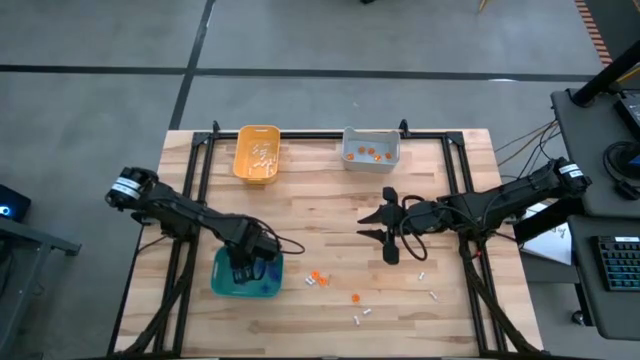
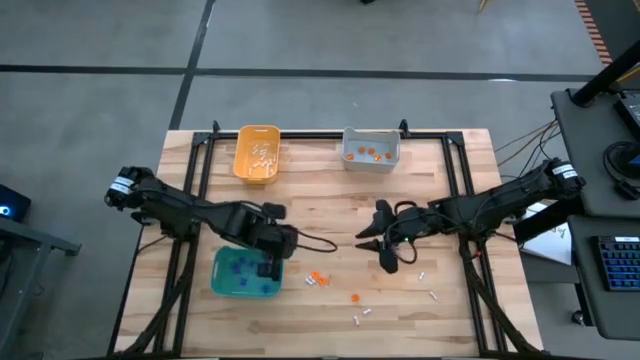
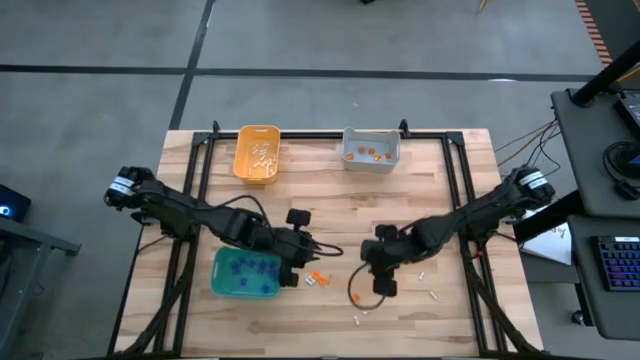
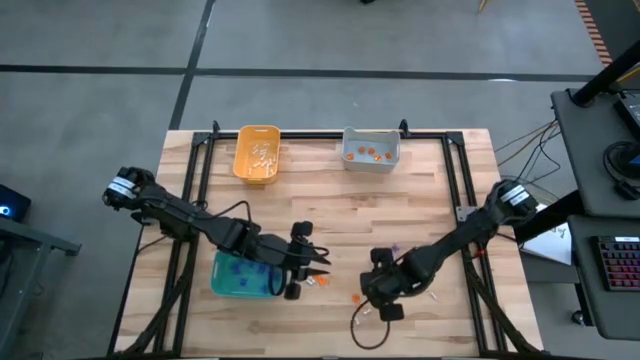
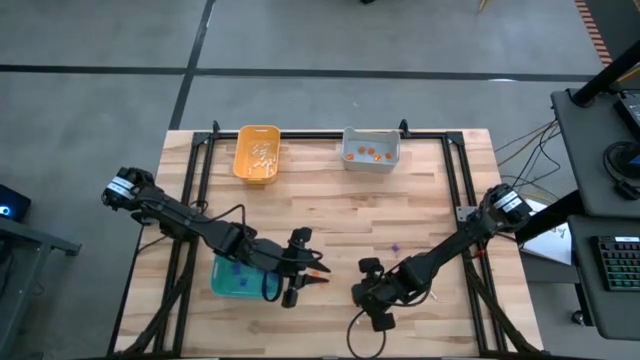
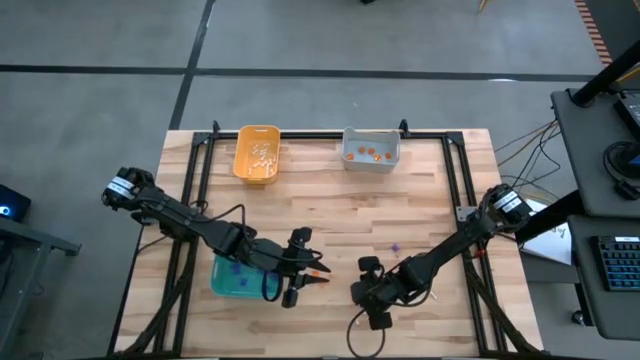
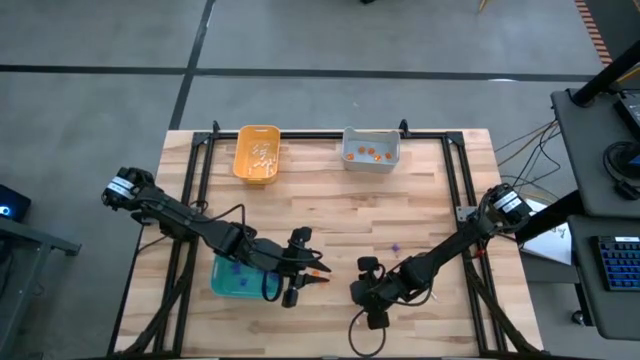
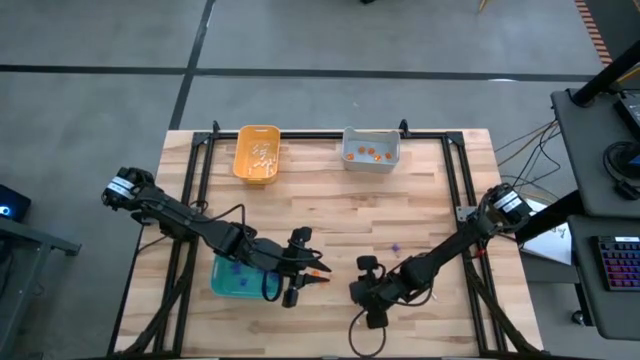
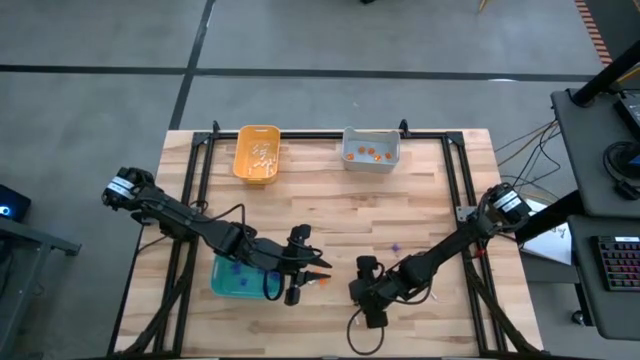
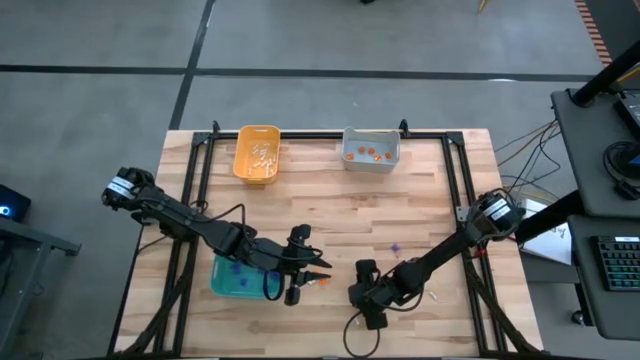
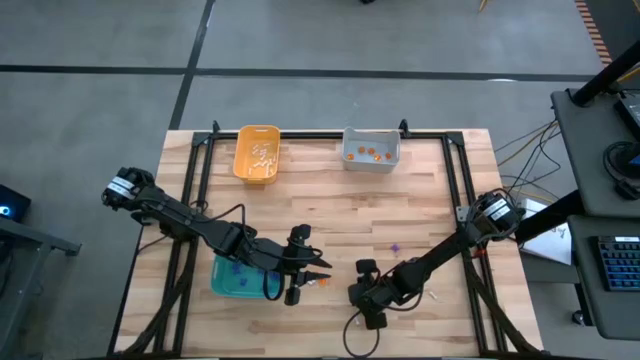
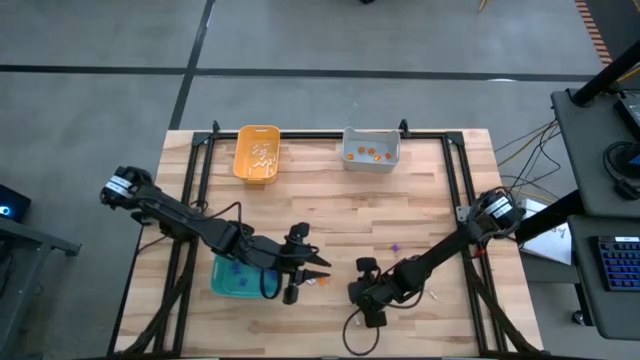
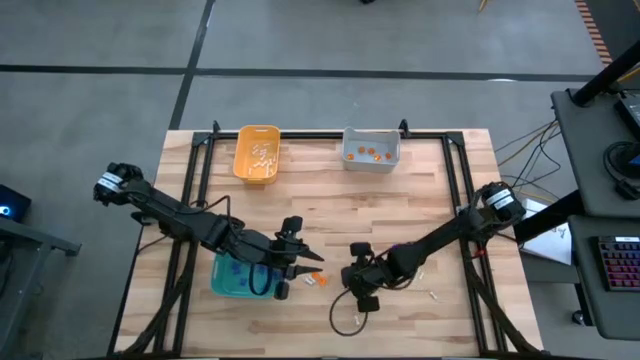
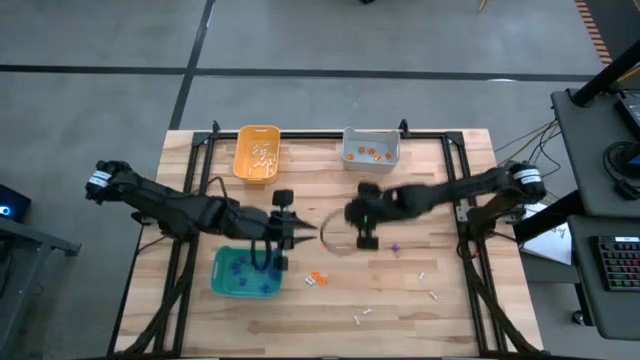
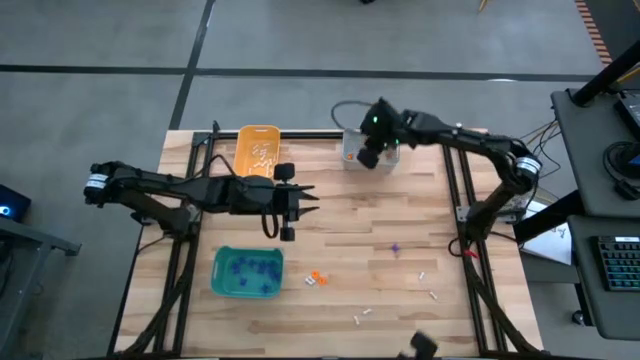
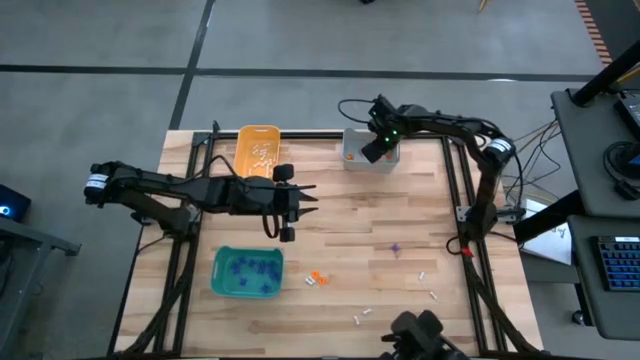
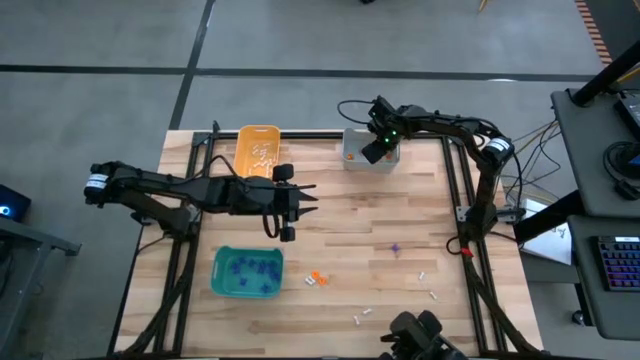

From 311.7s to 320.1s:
Task: Sort Halloween decoration
Put the orange pumpkin toy into the gray bin

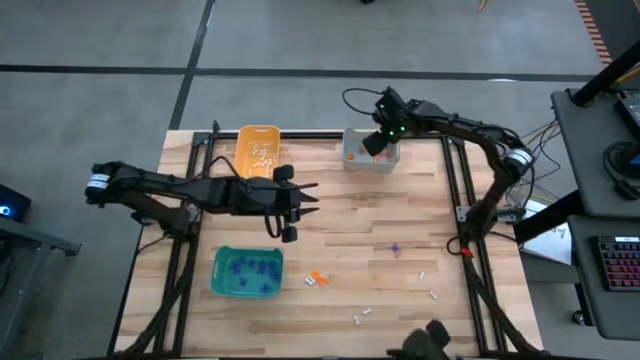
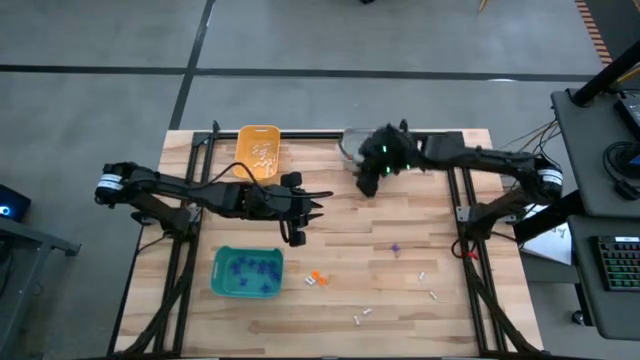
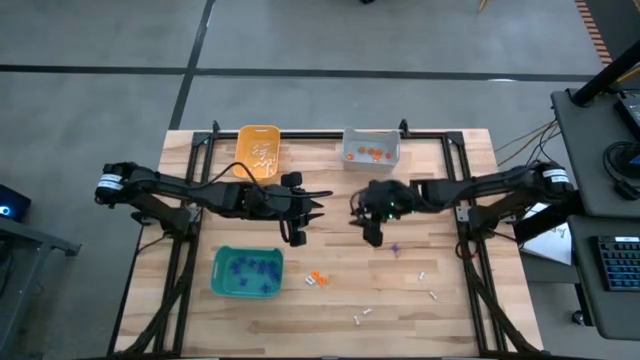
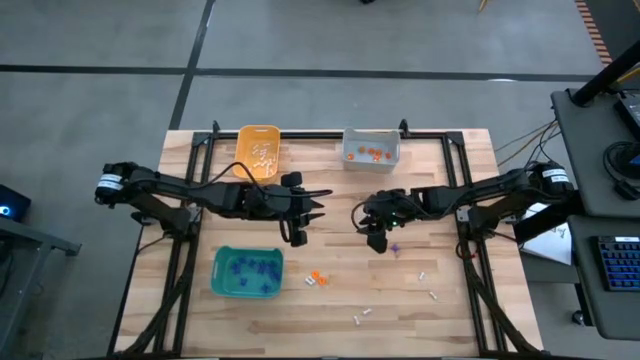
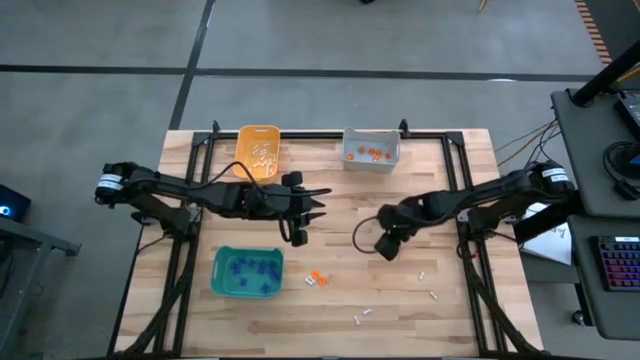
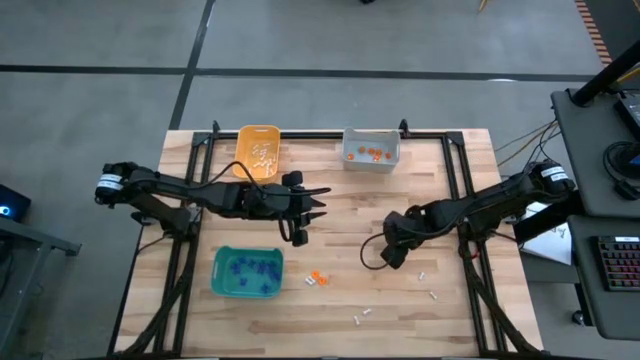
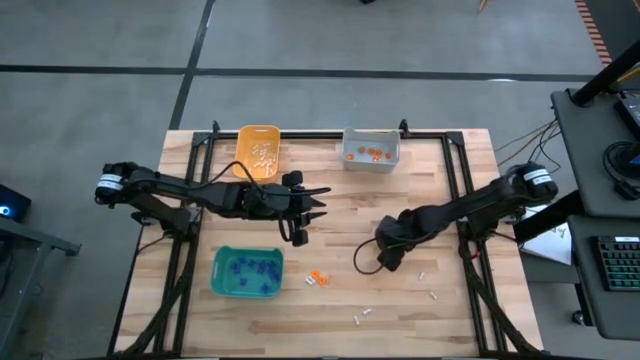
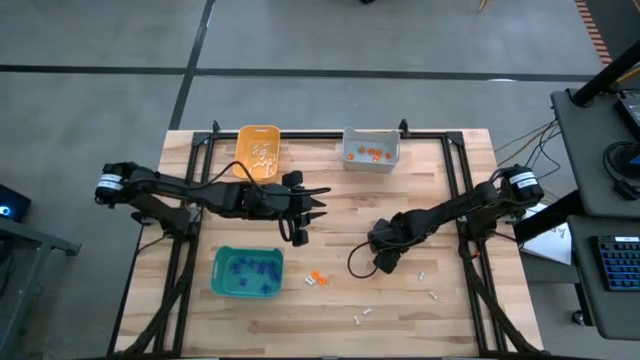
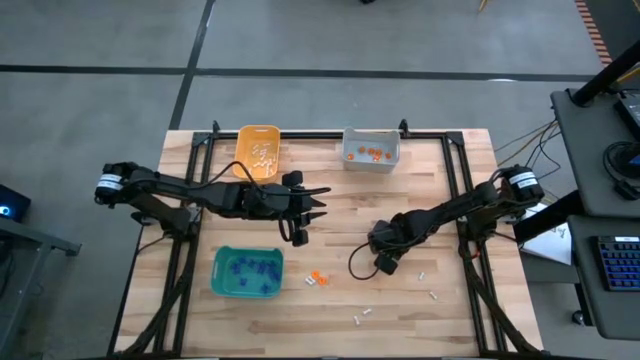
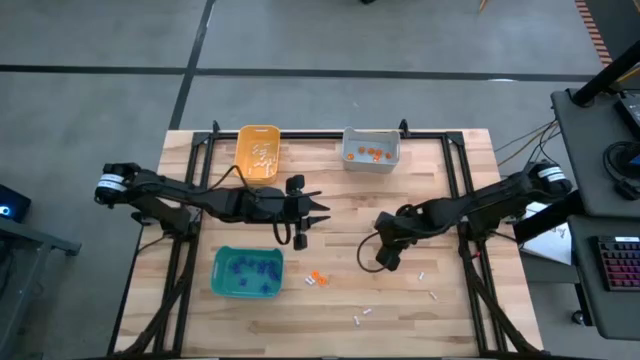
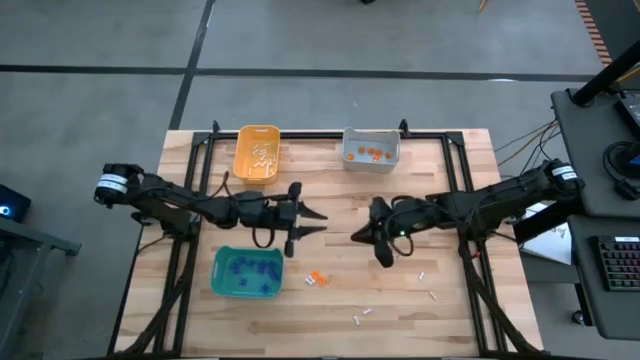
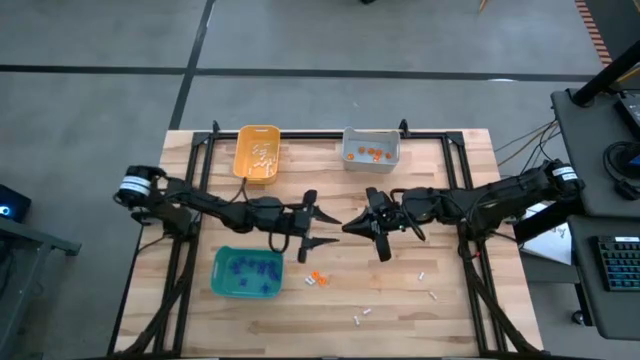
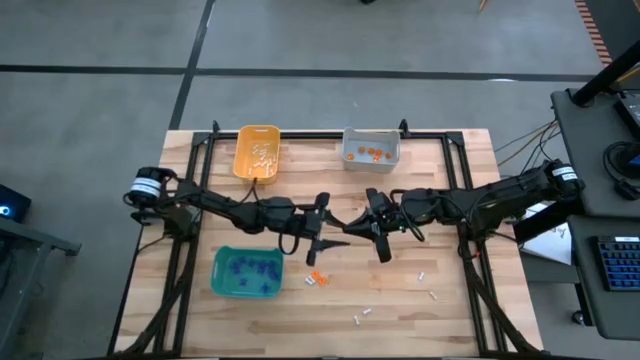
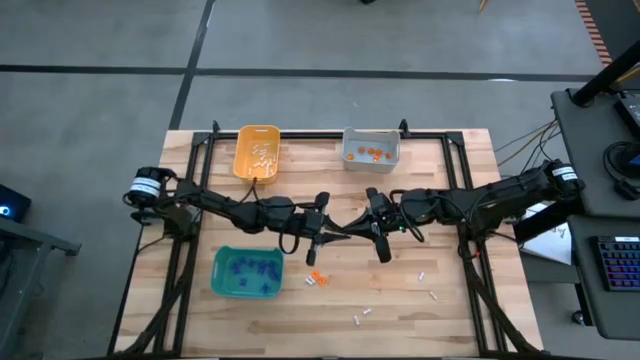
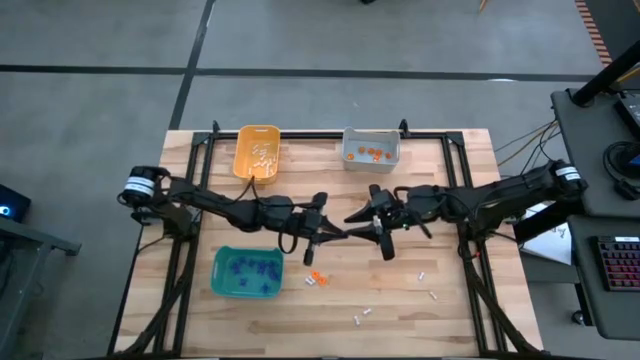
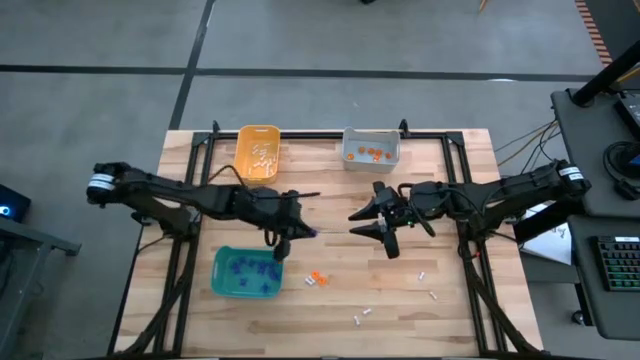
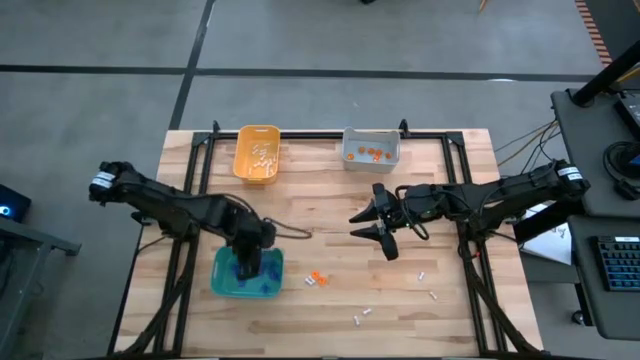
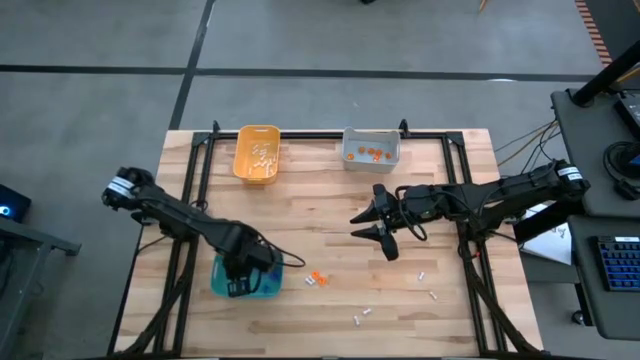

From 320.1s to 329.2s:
Put the blue spider toy into the green bin

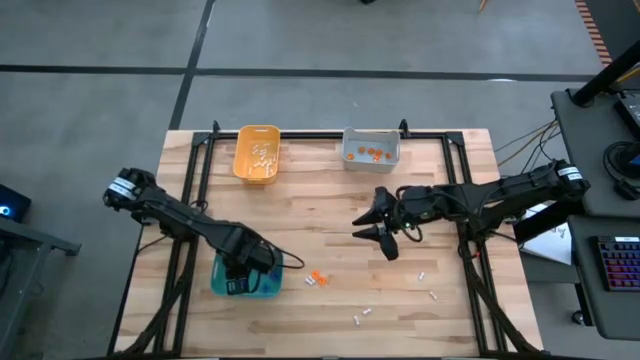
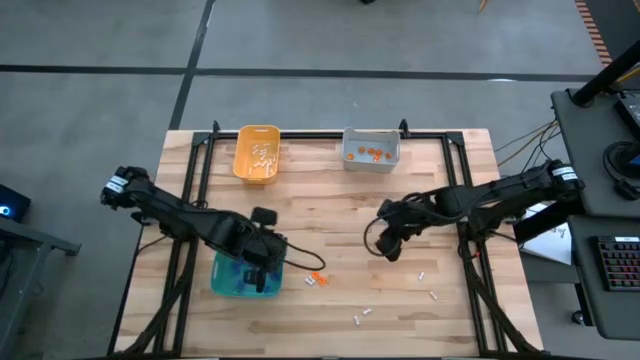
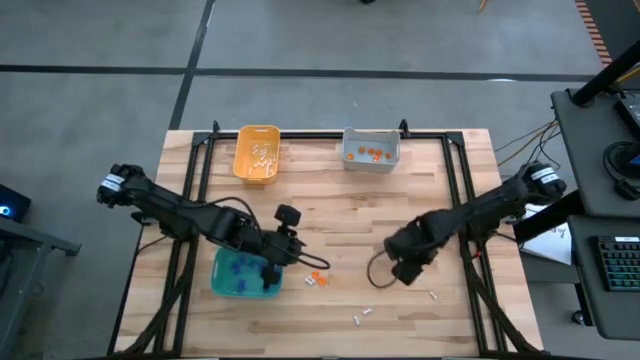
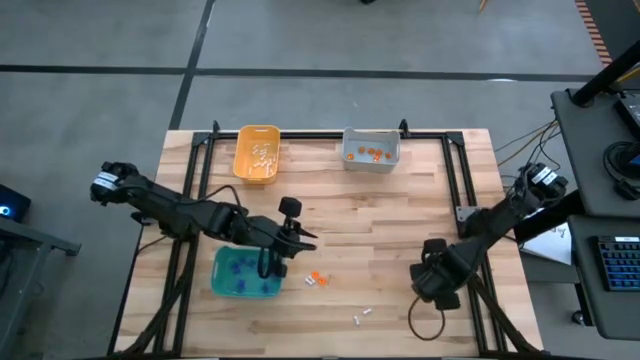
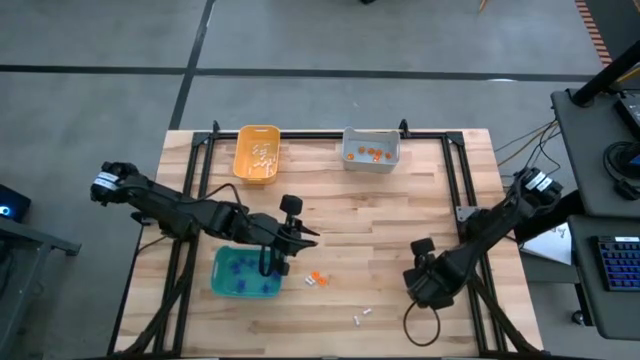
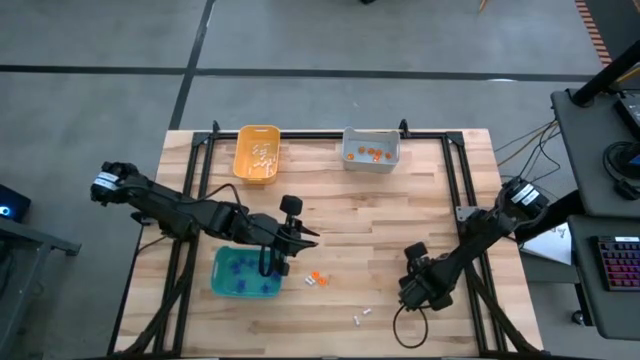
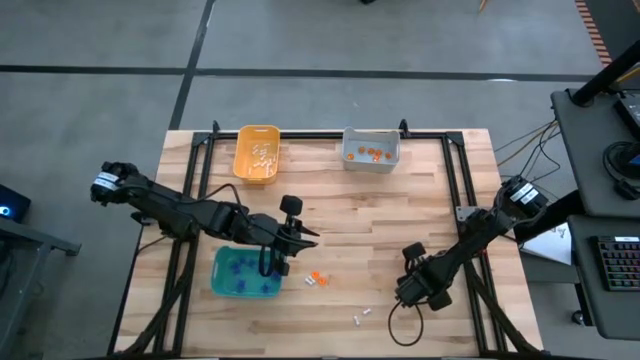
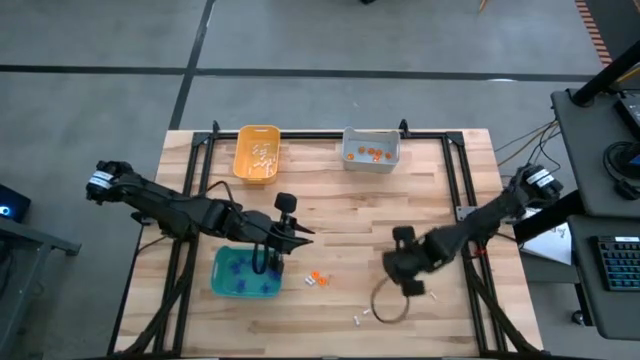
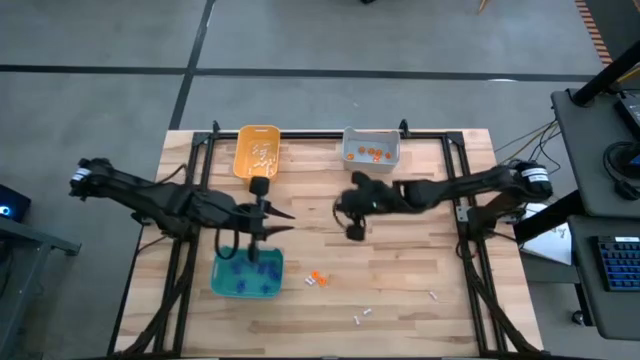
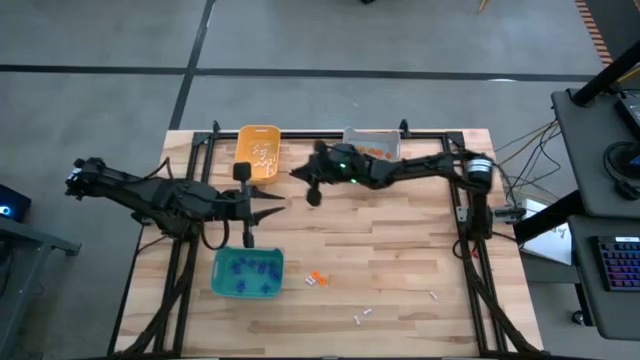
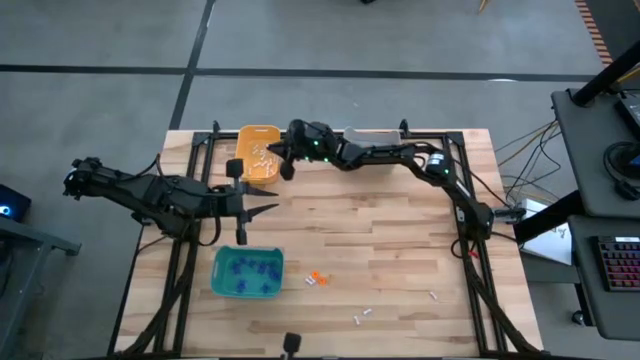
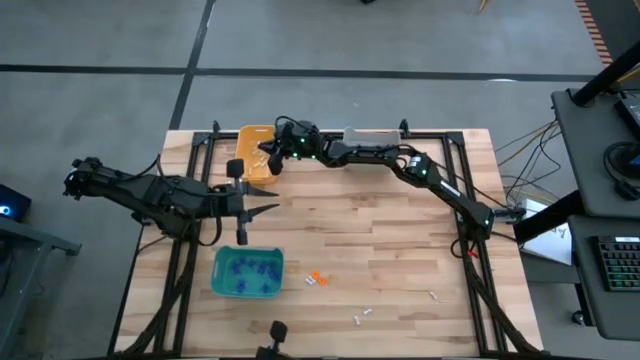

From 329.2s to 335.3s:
Put the white bone toy into the orange bin
